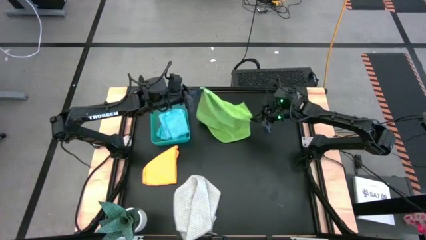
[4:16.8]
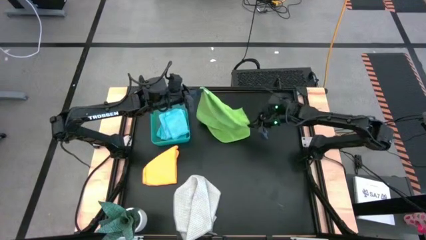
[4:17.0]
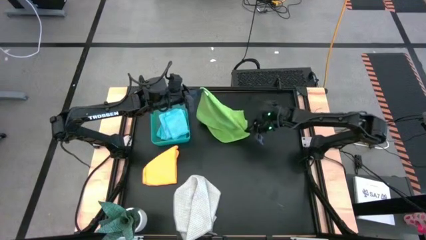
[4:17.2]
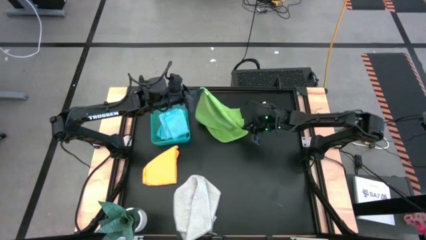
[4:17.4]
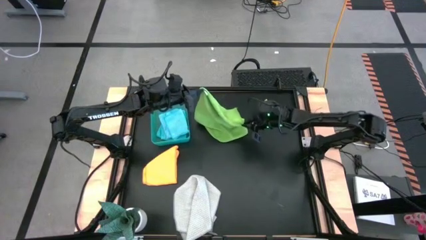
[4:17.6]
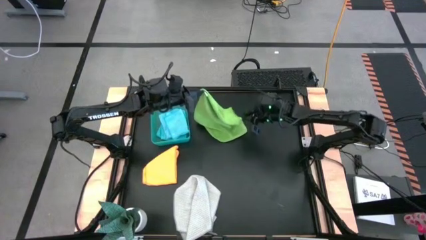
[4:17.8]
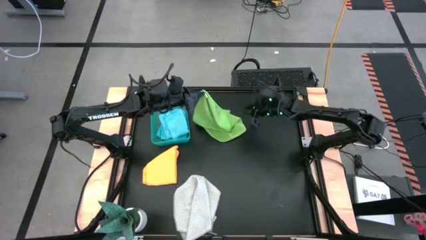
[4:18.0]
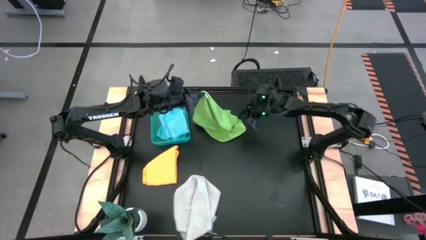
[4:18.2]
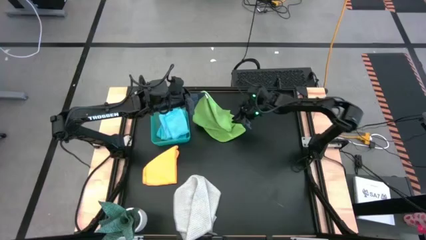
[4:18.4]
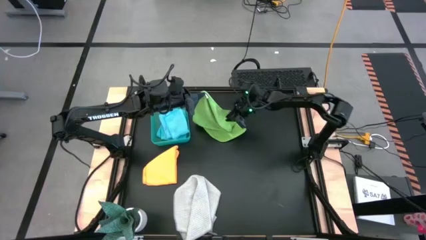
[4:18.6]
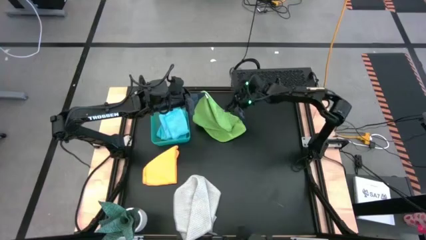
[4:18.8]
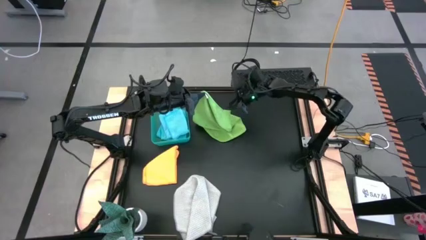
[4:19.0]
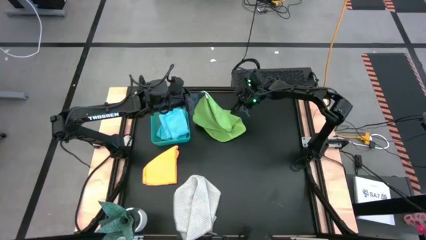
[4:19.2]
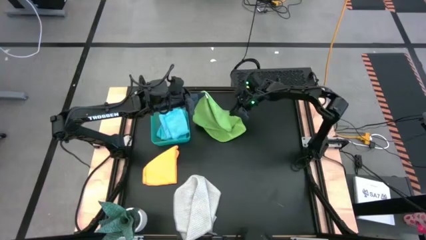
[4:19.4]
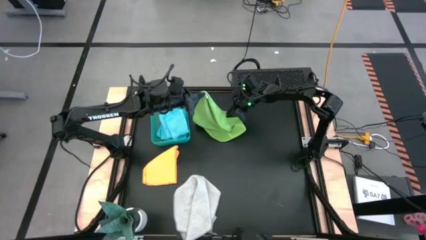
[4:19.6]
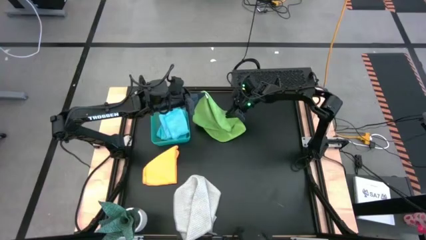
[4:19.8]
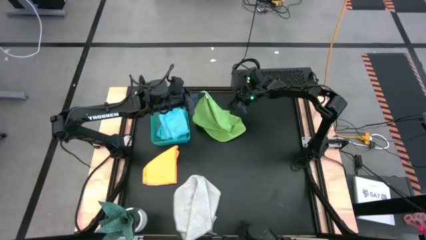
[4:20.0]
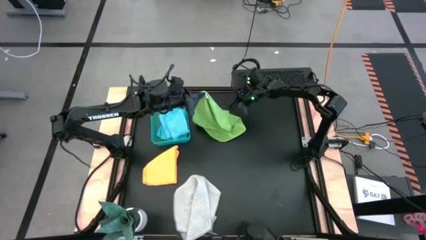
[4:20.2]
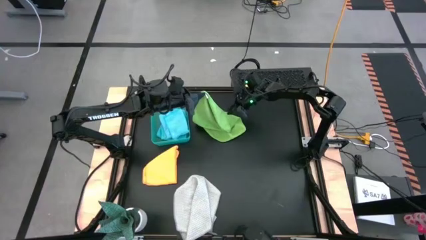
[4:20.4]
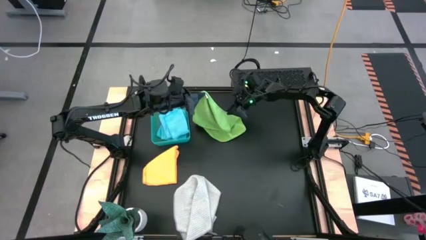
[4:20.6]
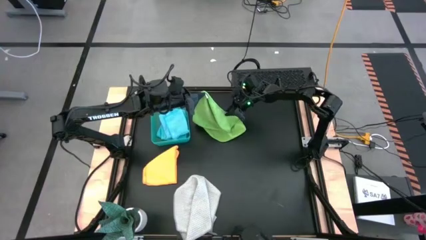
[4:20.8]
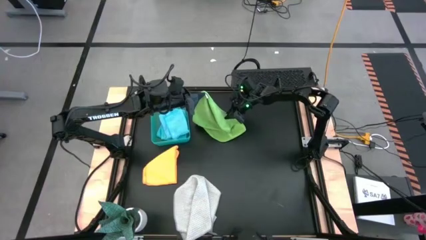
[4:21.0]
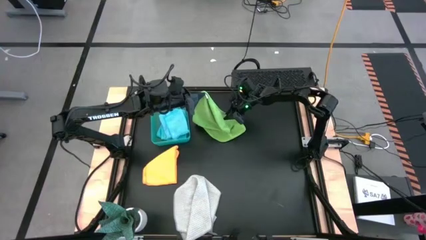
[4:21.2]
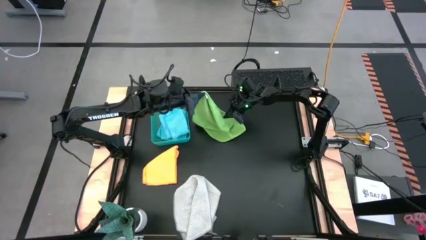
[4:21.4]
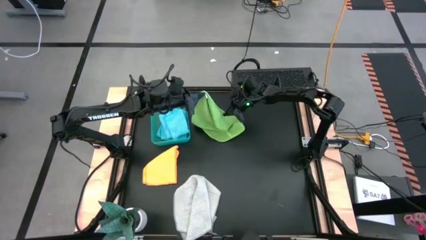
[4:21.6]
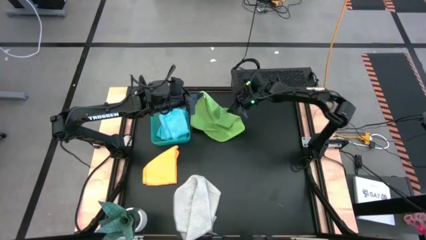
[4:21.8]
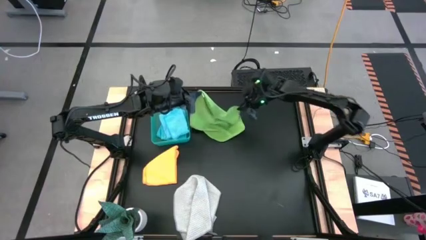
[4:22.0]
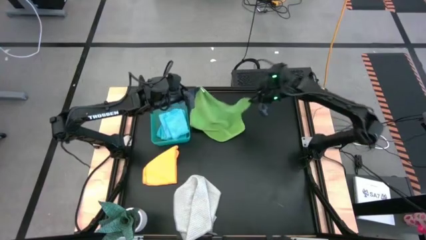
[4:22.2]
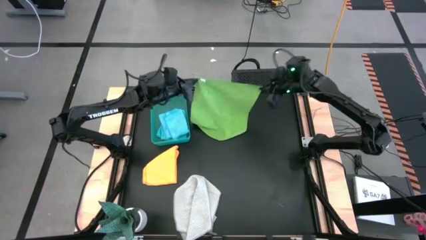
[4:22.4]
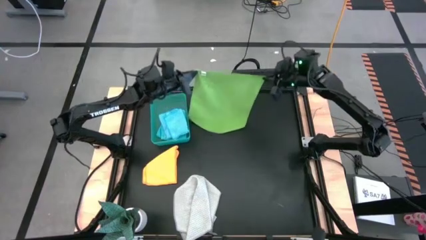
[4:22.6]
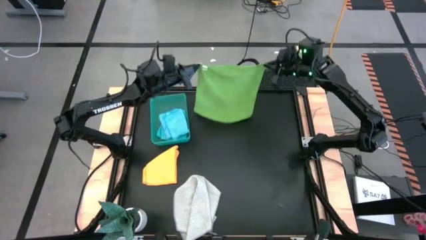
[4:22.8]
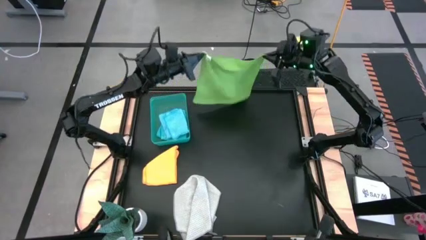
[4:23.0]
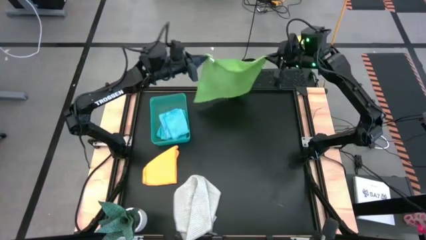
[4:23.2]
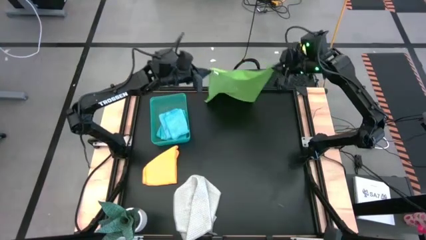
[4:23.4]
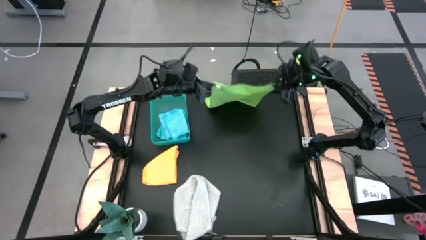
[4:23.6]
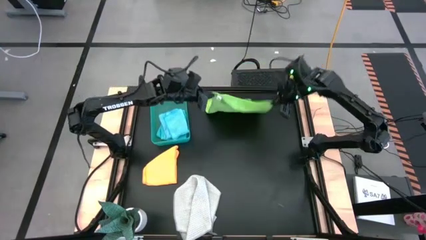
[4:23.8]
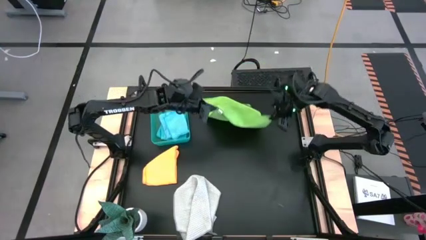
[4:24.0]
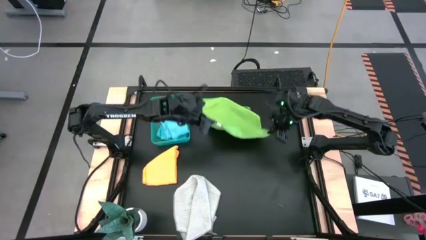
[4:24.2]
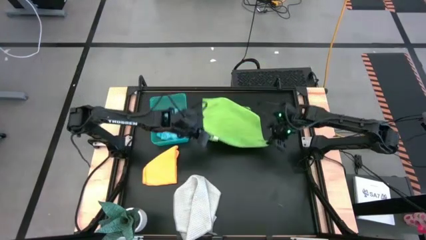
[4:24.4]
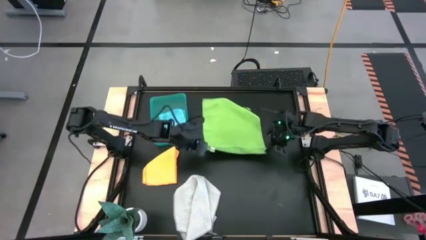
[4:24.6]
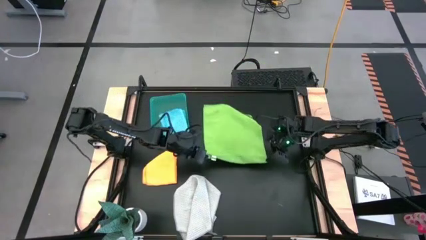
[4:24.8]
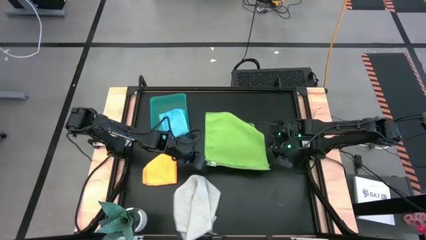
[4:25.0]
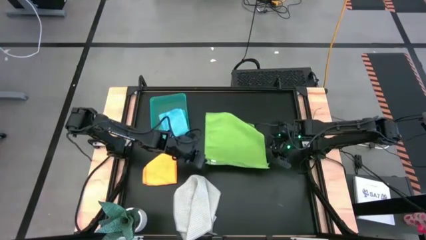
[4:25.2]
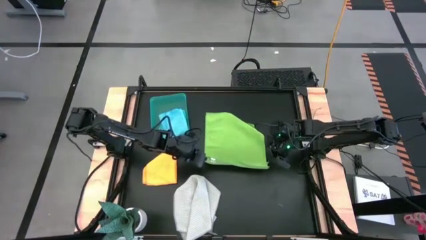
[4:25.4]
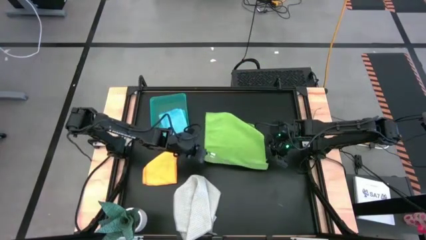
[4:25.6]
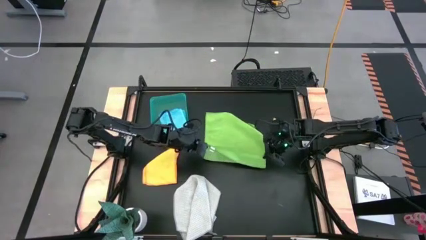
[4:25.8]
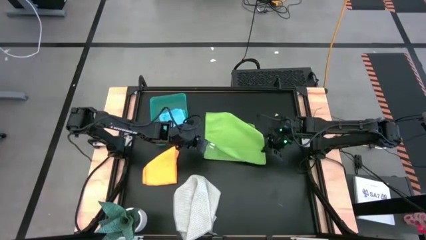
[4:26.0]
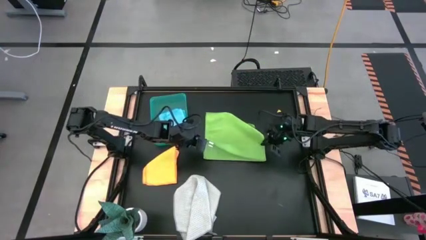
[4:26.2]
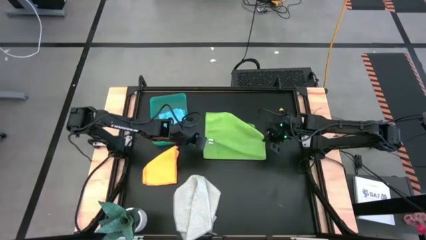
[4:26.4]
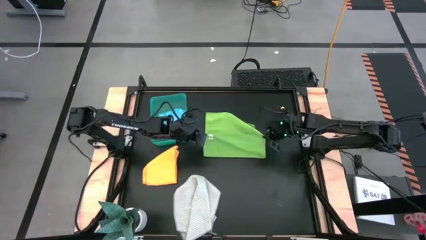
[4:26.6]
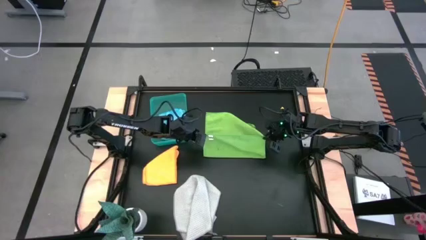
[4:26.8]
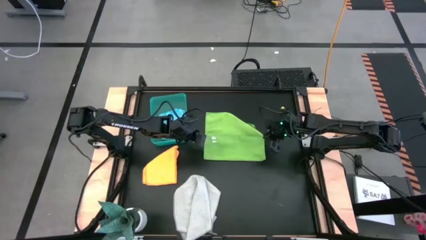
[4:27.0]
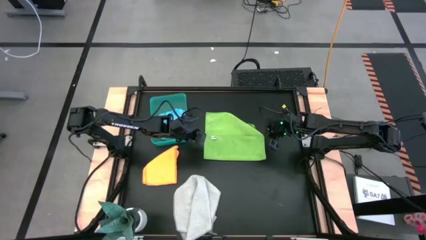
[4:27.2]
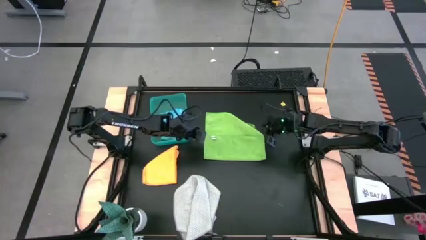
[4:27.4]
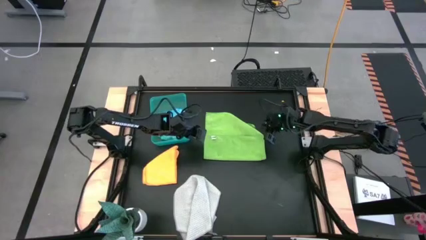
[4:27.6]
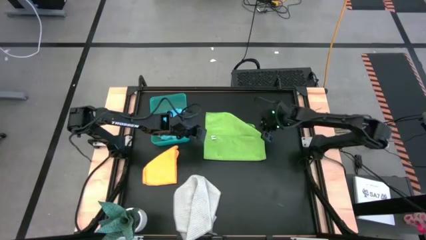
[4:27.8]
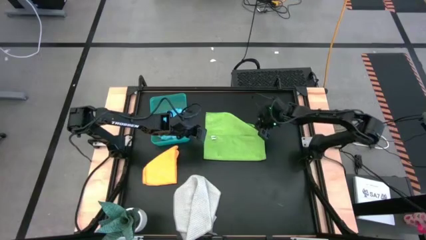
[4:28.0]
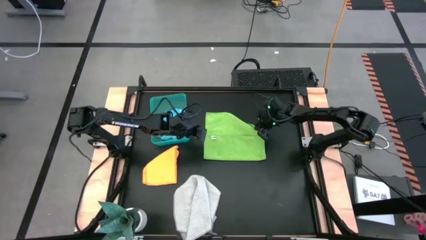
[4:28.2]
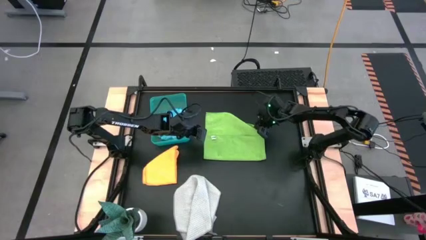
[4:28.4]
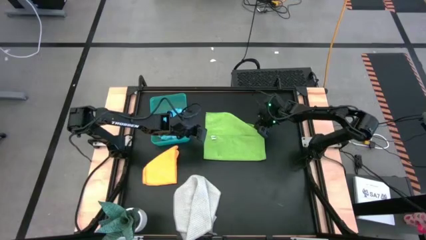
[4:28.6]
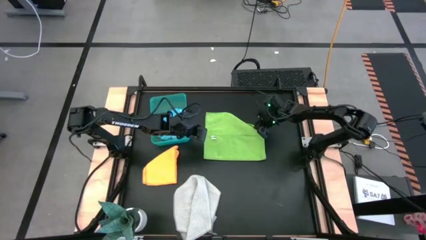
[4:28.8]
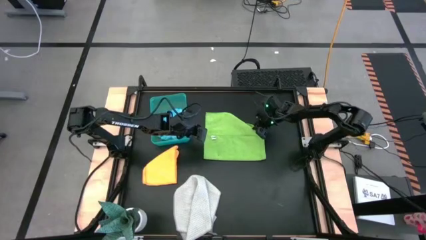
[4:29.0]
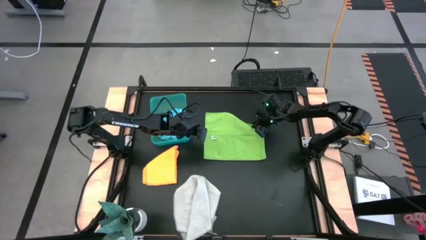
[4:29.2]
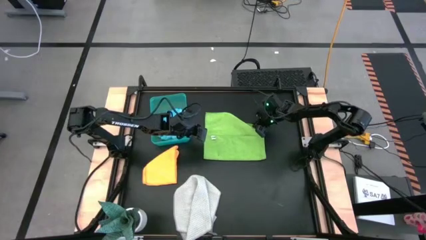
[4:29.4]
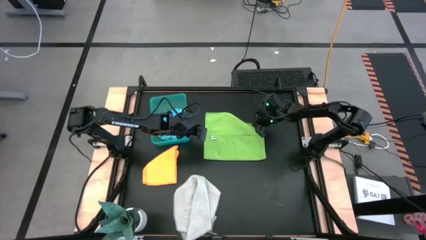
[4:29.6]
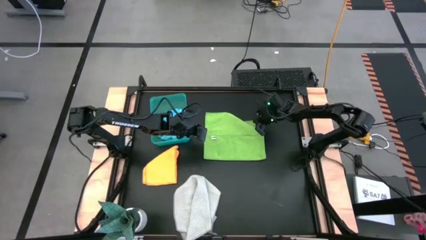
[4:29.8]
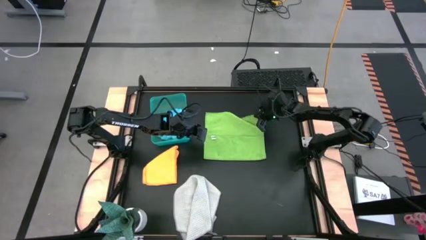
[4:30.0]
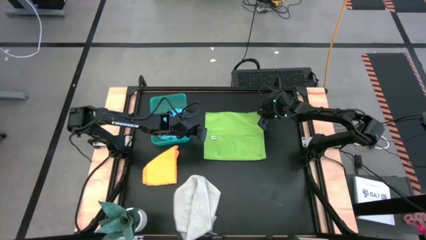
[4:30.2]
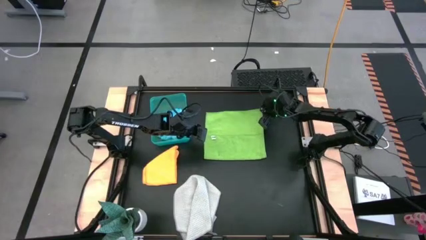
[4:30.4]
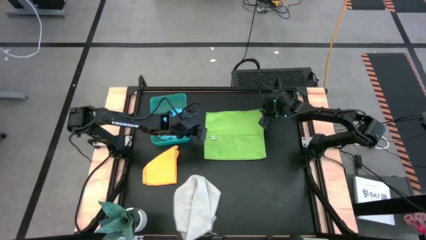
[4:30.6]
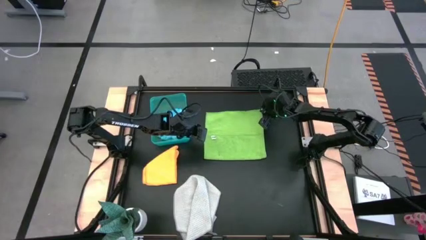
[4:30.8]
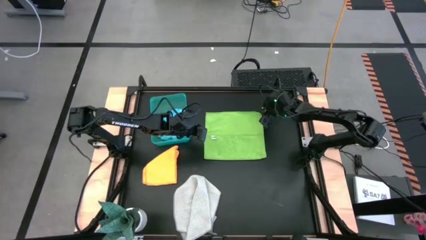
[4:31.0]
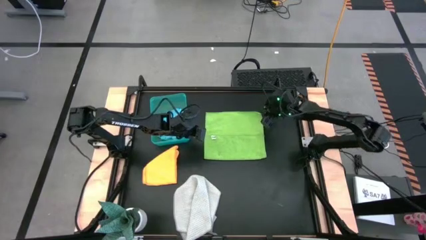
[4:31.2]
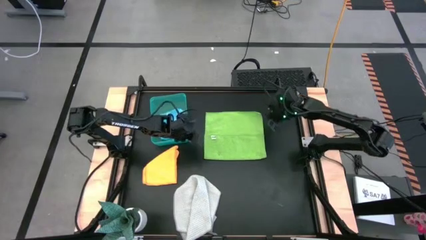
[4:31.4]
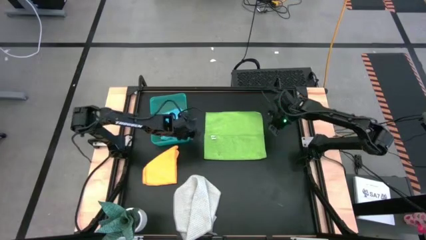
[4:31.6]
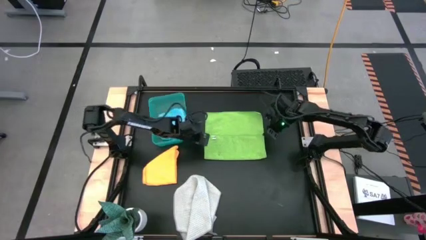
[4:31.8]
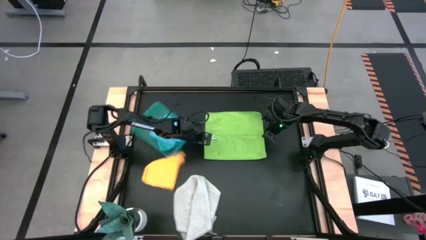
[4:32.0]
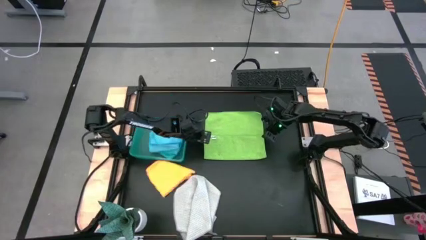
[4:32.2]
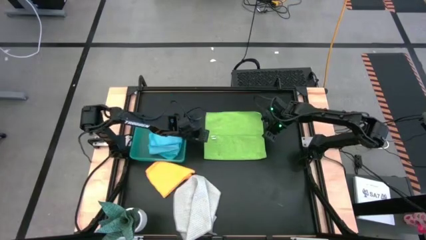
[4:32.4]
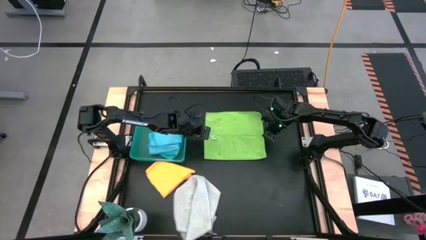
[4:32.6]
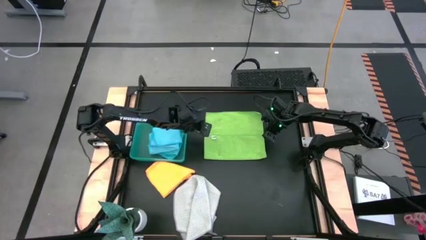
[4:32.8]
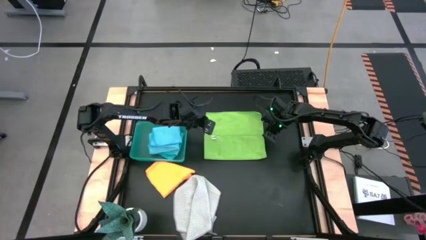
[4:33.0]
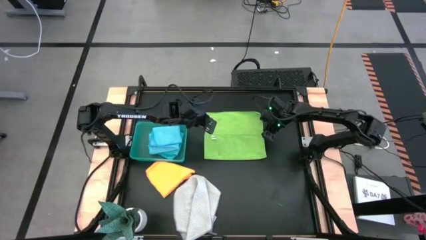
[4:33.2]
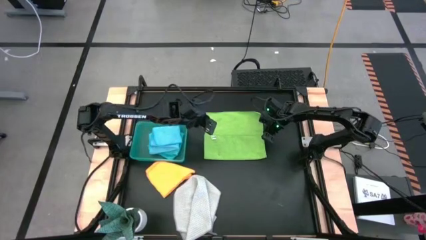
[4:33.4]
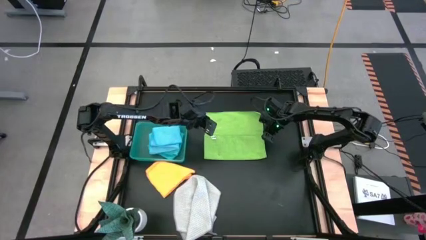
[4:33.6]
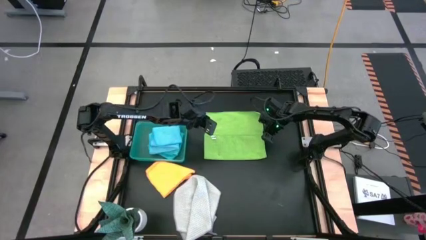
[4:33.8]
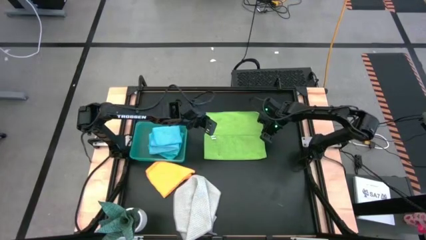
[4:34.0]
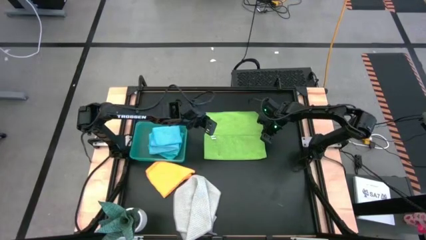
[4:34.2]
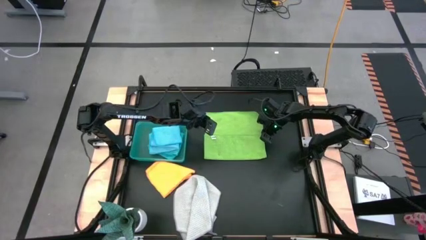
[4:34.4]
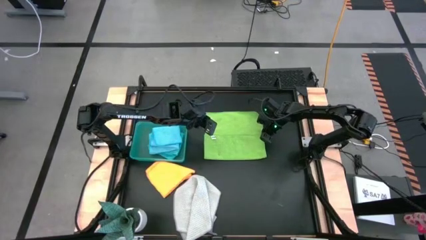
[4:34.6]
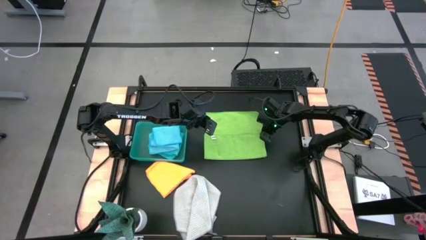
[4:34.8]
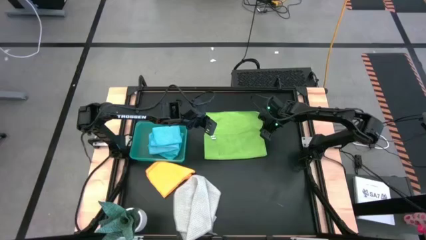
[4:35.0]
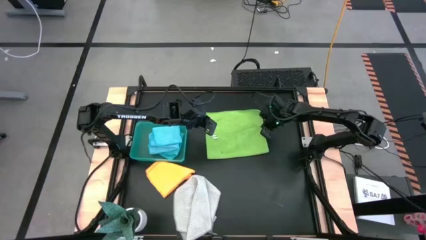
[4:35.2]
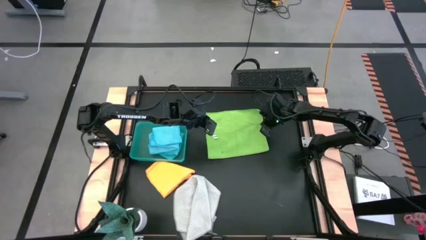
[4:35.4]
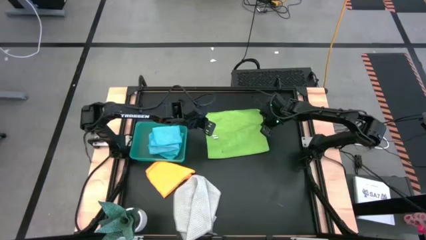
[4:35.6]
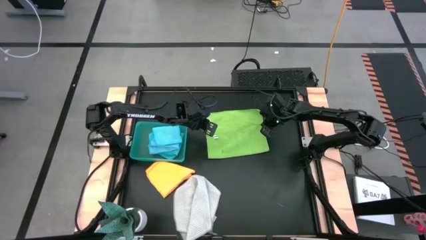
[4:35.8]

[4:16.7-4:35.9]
Task: Fold microfiber towels
Fold the green microfiber towel
